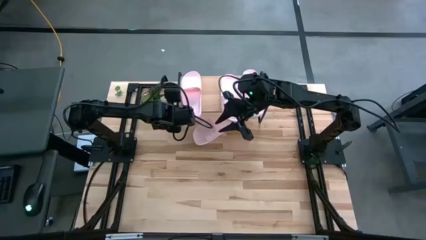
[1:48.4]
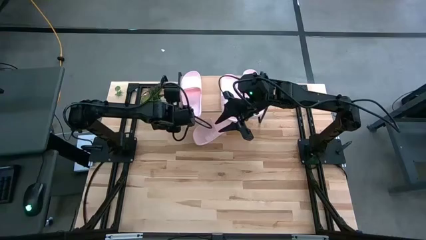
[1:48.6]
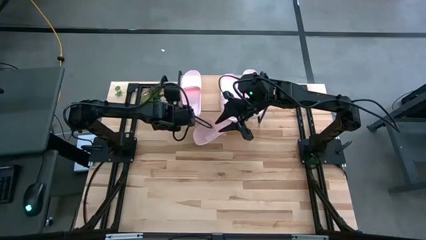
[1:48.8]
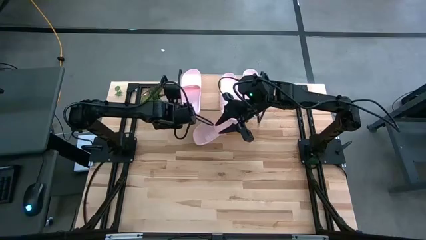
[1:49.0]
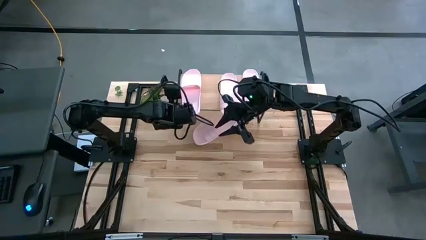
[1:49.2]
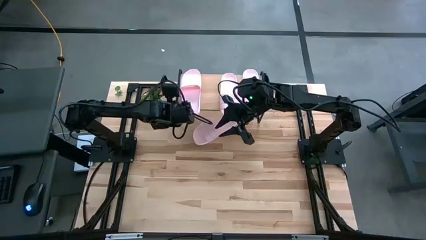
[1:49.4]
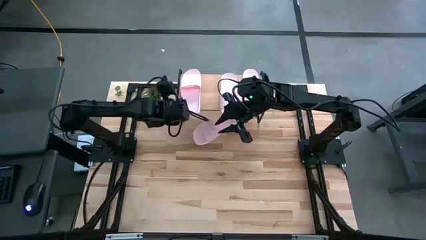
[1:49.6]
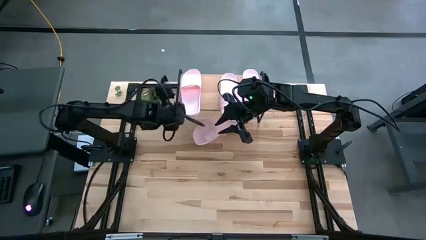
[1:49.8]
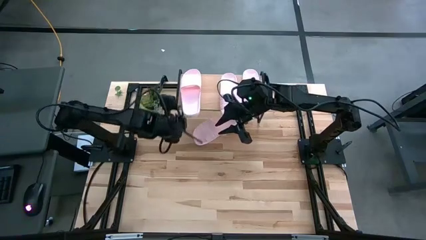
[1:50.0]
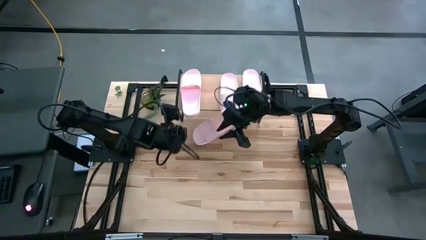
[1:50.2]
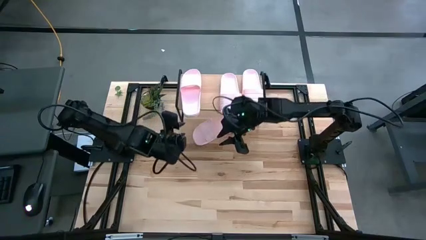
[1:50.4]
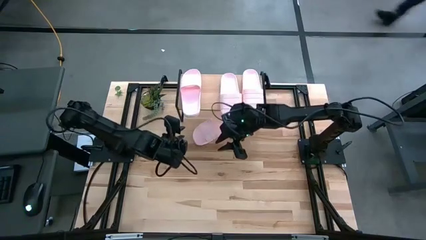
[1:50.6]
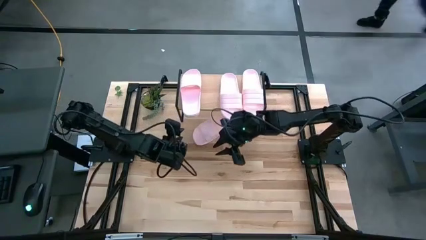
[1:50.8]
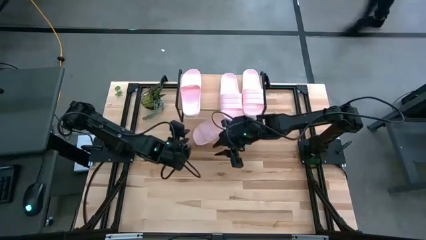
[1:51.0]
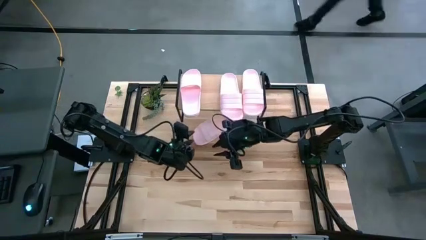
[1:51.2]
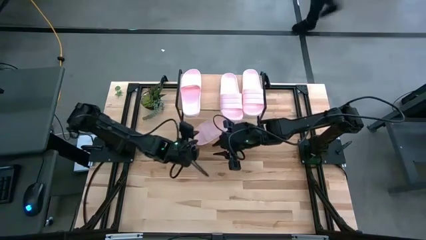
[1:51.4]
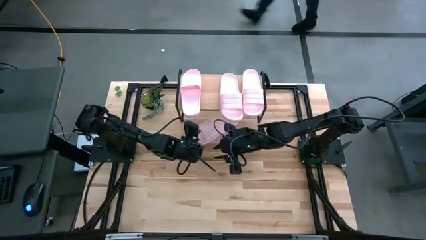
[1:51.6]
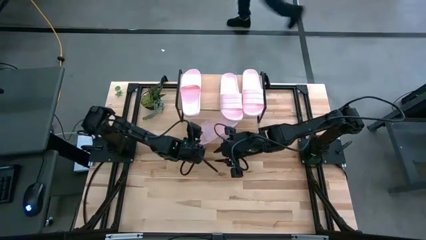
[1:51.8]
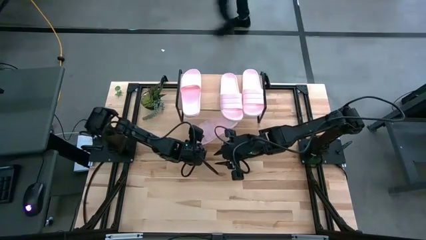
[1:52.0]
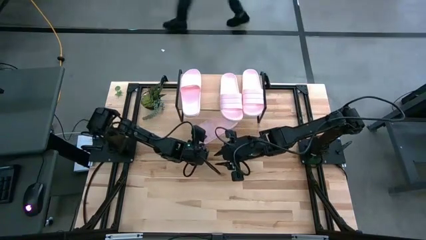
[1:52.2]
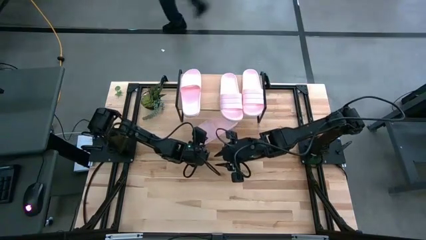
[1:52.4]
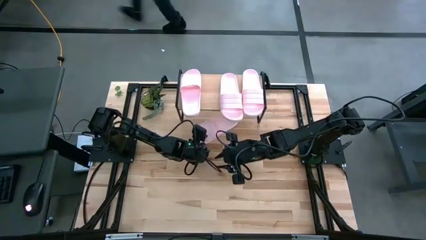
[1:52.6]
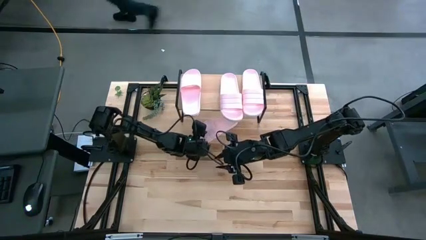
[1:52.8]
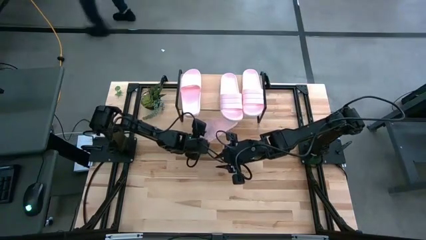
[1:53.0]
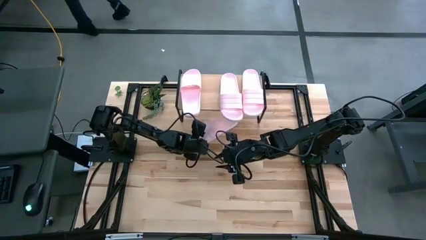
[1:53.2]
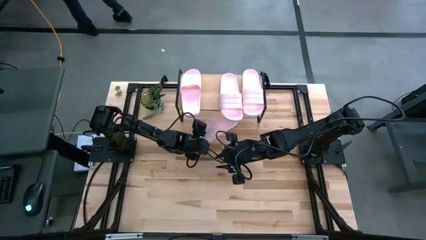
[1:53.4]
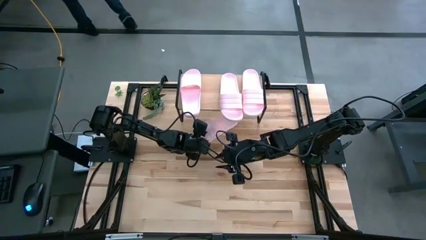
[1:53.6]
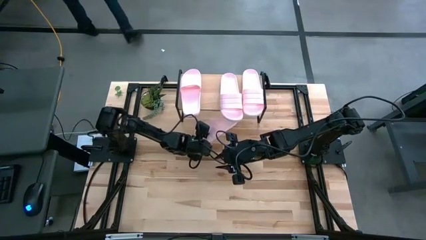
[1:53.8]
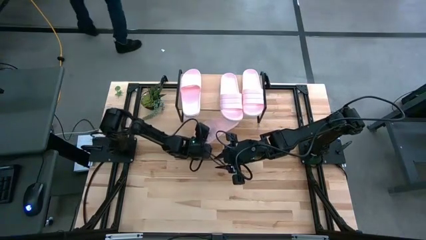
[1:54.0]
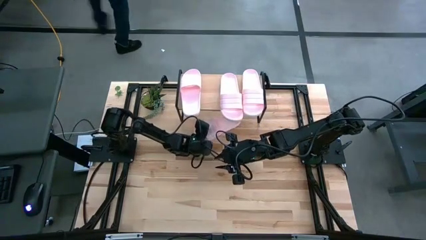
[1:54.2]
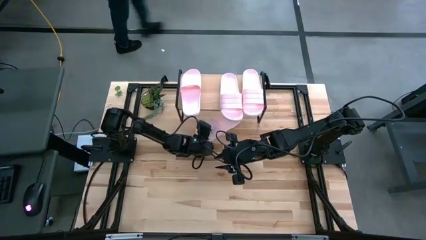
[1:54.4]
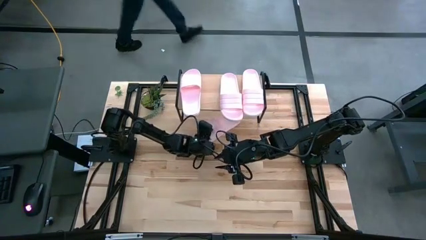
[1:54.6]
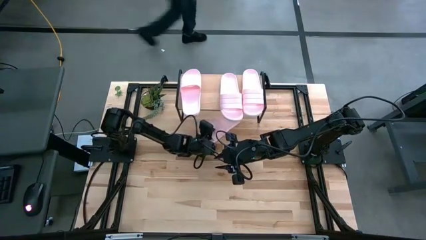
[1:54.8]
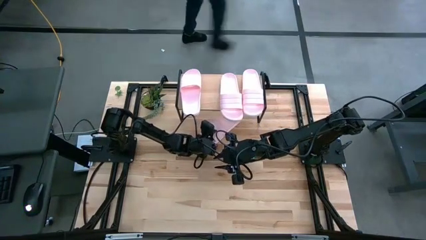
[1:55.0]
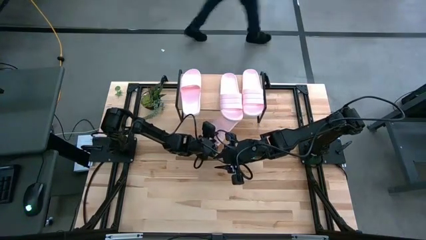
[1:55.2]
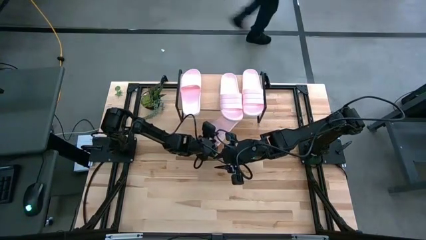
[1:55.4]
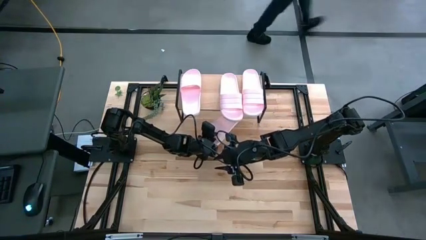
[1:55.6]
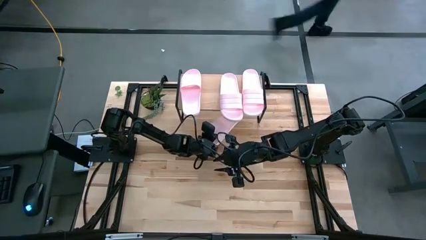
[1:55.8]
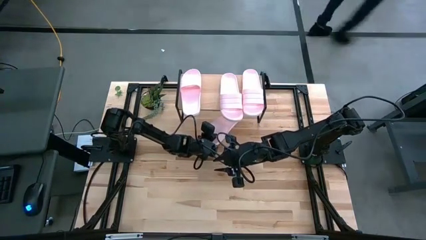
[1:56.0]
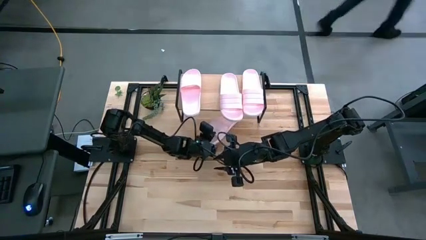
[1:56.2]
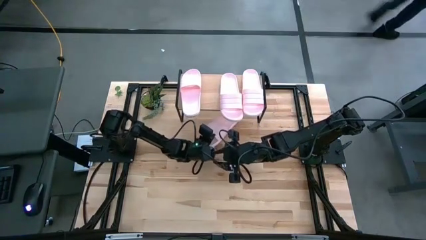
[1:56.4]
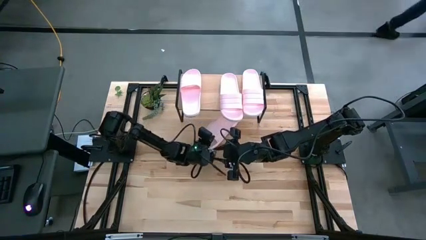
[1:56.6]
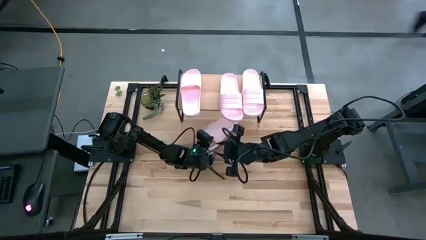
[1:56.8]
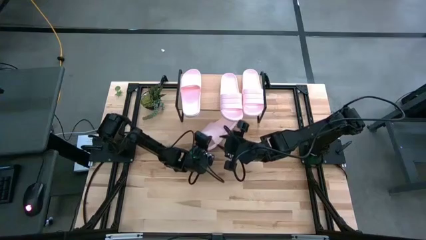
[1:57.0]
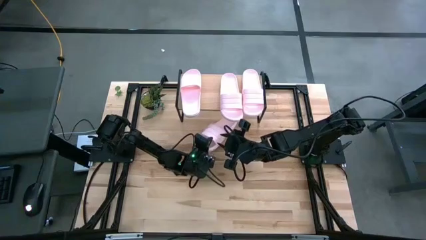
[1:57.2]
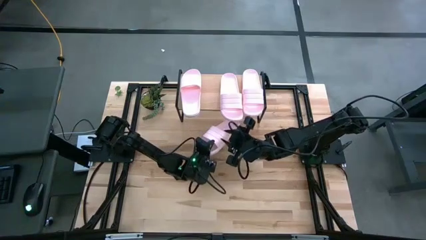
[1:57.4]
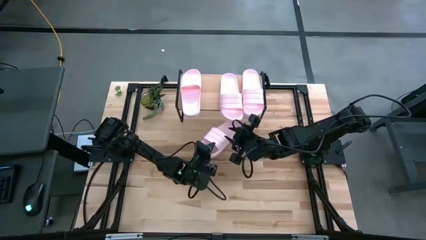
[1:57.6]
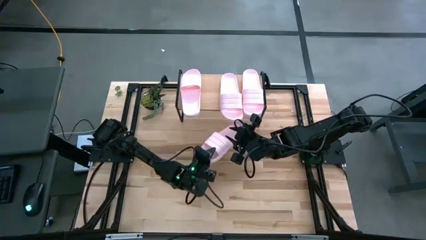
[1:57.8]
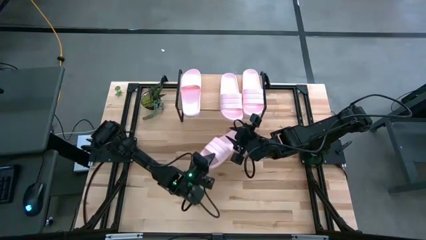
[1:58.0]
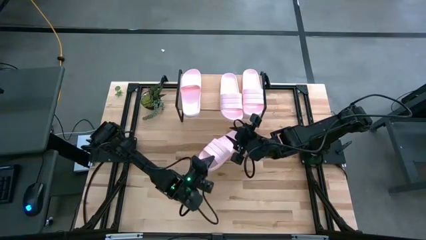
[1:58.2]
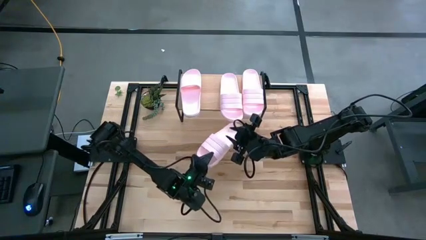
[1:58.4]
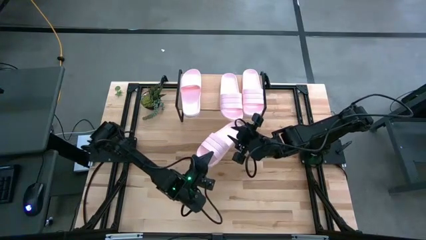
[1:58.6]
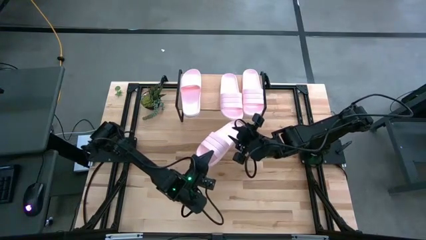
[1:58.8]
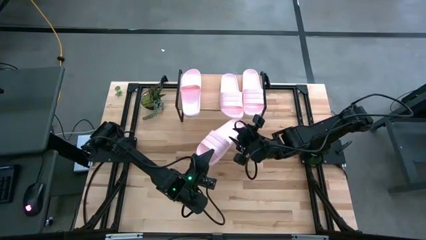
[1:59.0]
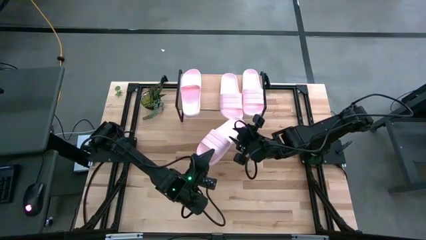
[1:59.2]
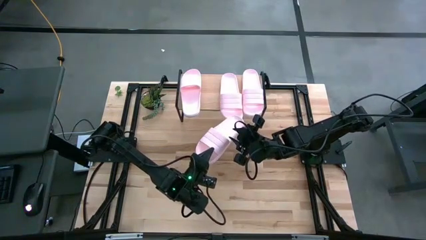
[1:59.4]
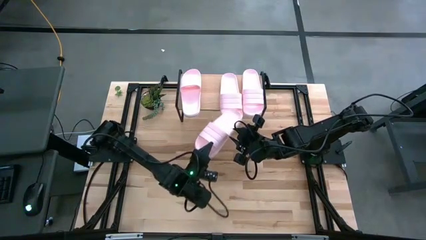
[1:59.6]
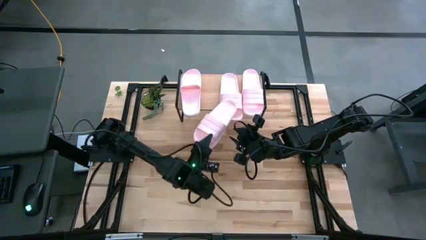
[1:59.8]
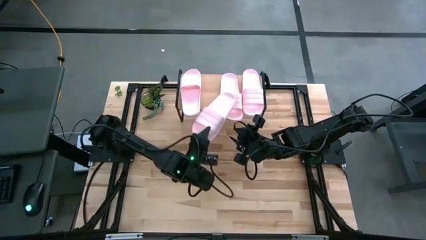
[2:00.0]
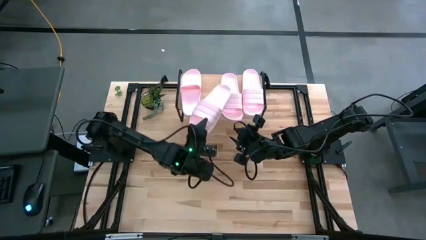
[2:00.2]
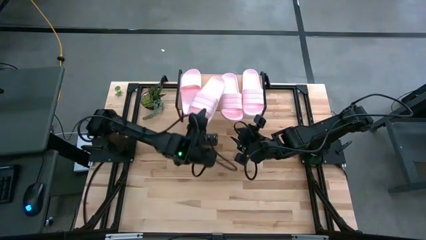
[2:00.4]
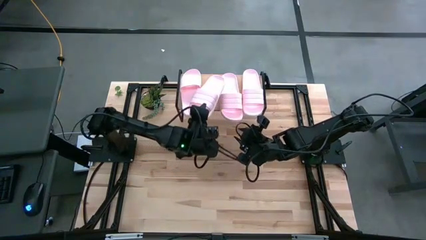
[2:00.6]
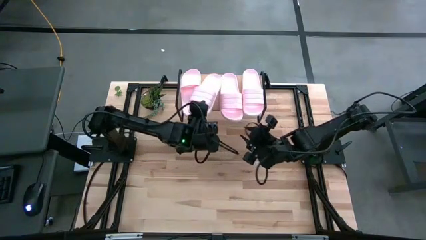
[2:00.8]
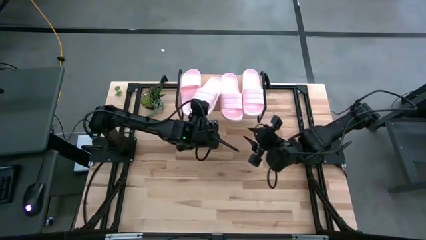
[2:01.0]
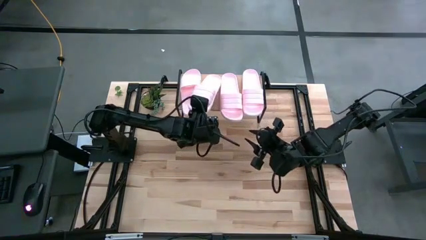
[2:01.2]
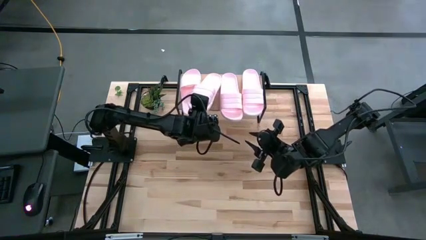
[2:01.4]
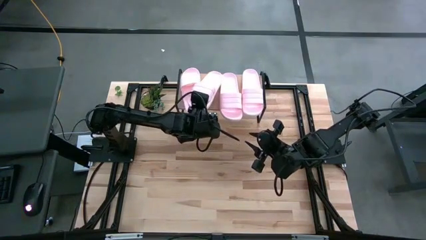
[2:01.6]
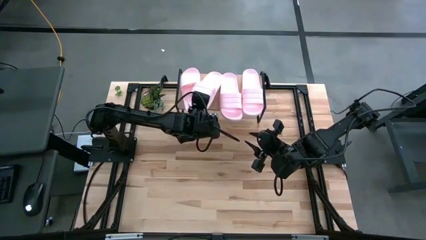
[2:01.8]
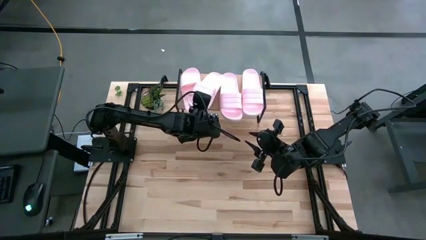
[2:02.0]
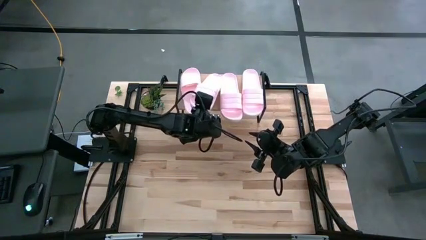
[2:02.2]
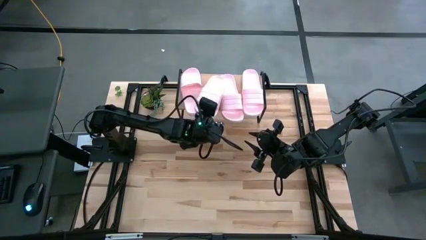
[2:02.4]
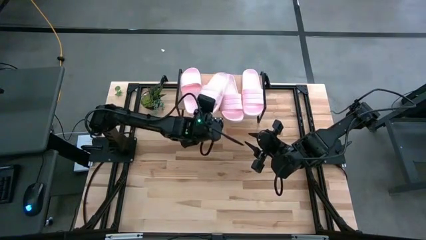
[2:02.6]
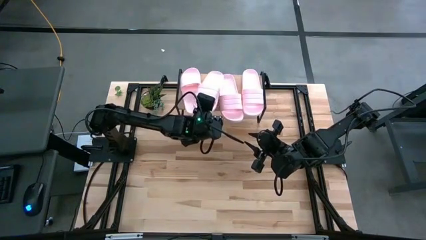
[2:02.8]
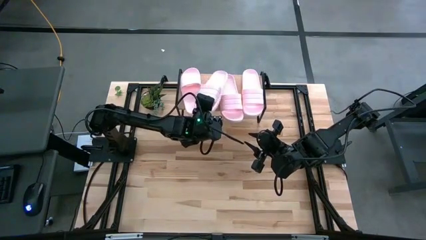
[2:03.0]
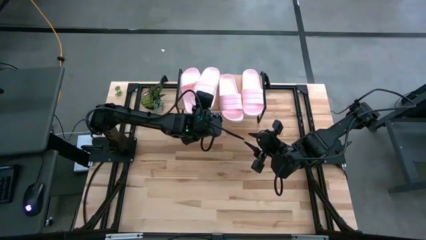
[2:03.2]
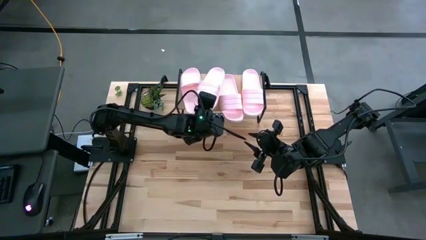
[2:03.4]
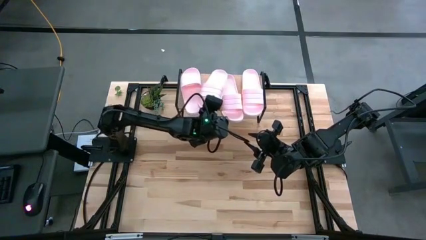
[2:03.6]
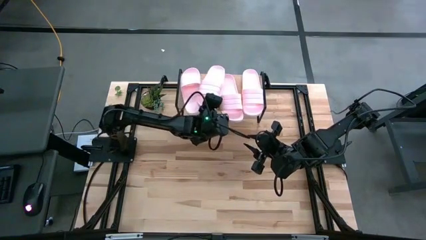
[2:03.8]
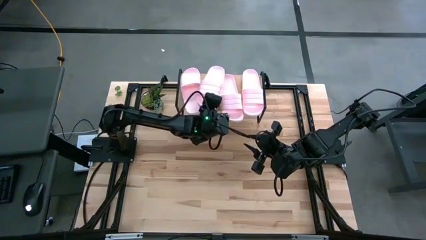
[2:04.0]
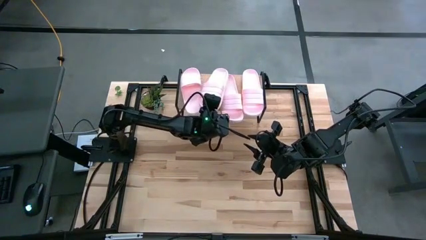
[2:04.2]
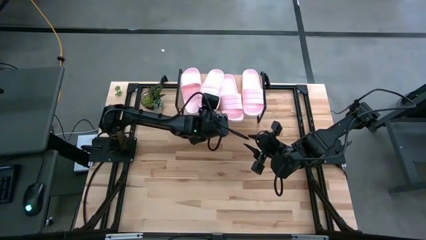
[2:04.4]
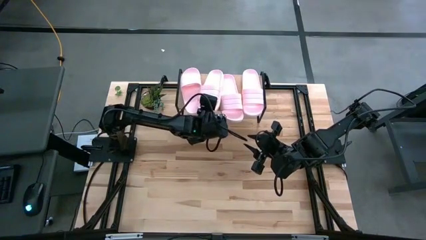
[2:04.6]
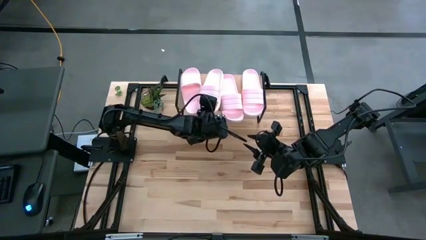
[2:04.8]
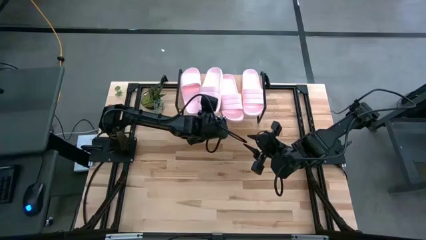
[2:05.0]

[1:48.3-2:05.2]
Task: Pick and place slides into the shelf
Put the pink slide on the shelf
